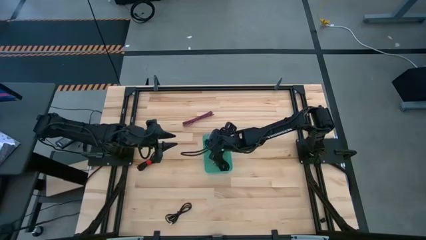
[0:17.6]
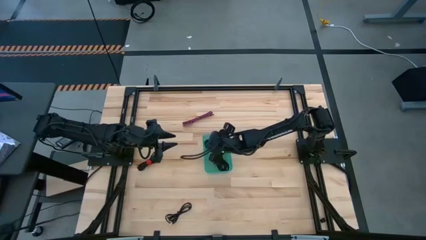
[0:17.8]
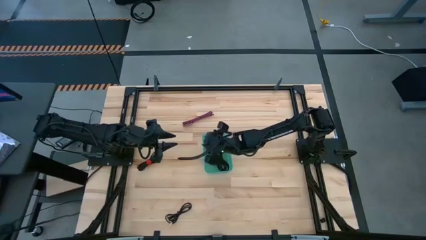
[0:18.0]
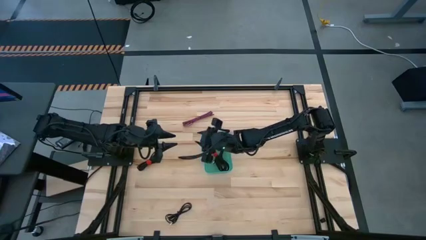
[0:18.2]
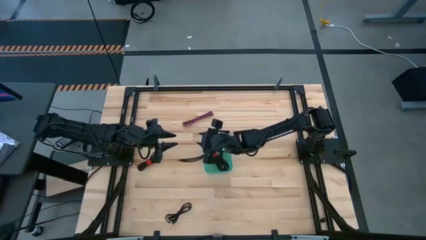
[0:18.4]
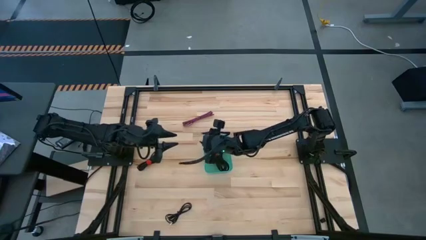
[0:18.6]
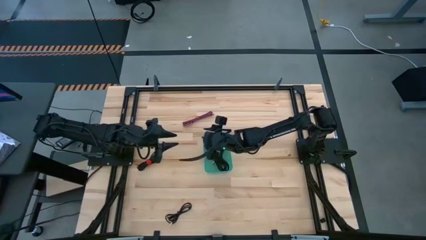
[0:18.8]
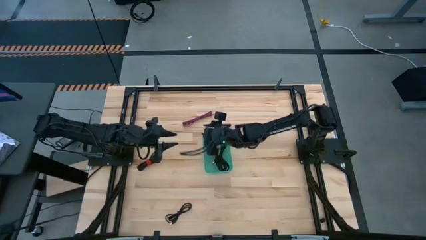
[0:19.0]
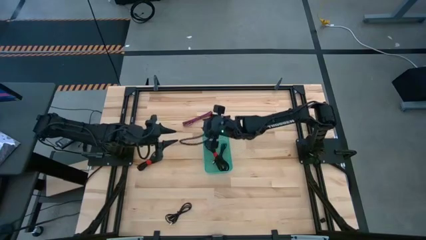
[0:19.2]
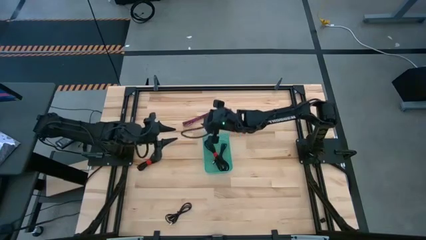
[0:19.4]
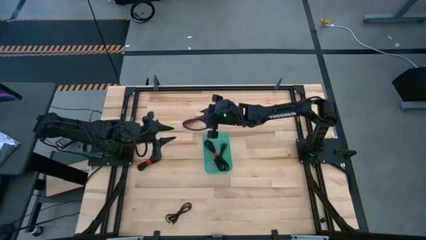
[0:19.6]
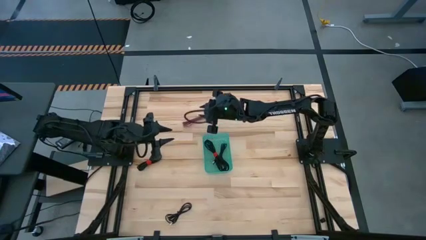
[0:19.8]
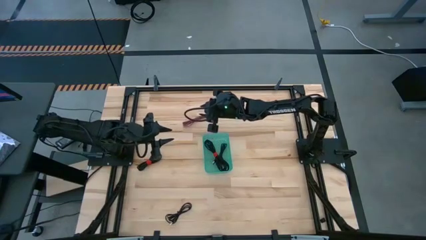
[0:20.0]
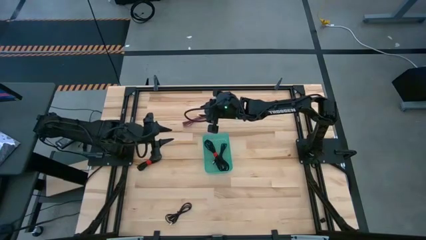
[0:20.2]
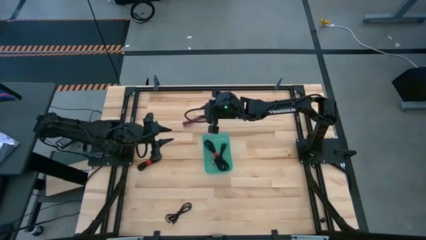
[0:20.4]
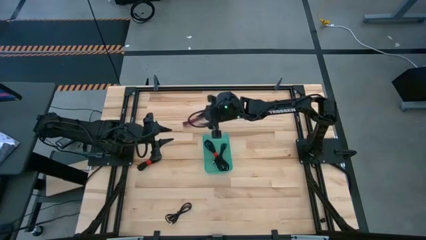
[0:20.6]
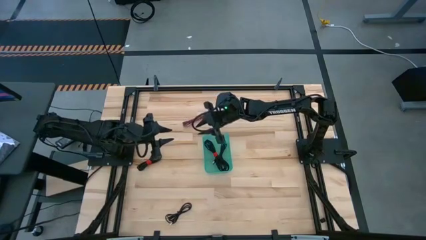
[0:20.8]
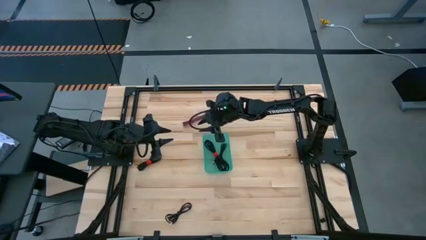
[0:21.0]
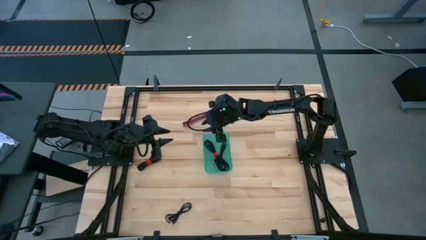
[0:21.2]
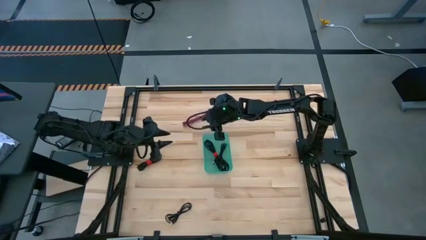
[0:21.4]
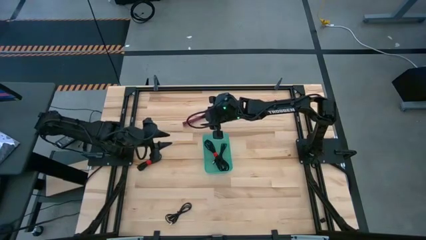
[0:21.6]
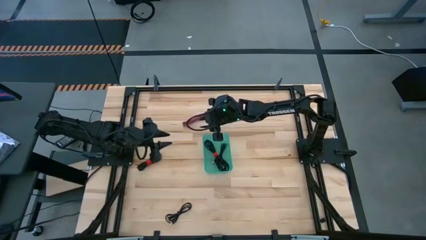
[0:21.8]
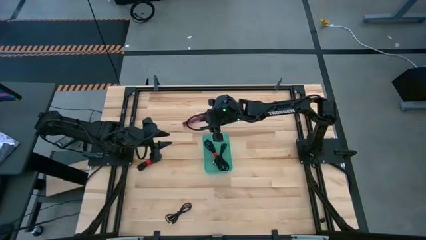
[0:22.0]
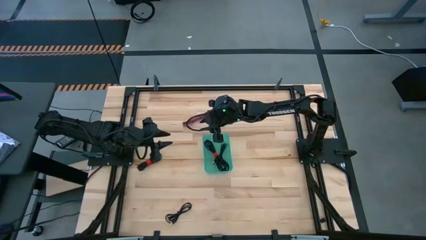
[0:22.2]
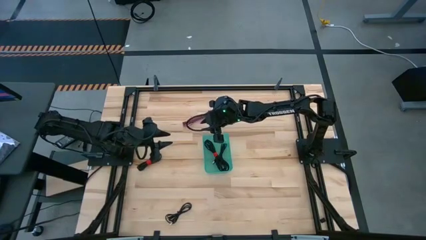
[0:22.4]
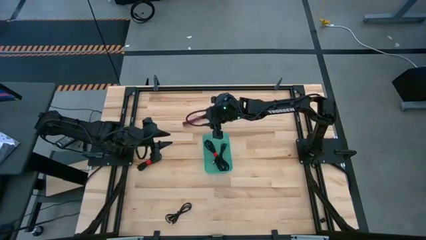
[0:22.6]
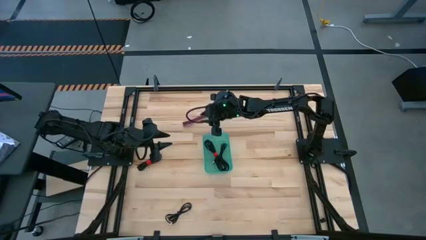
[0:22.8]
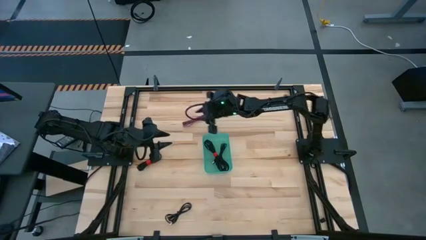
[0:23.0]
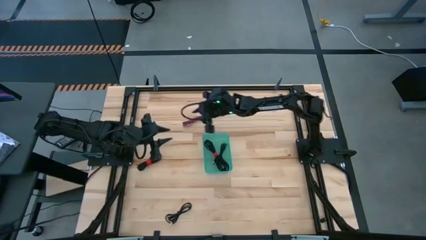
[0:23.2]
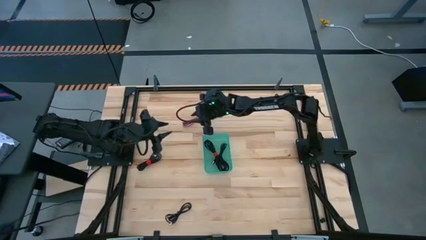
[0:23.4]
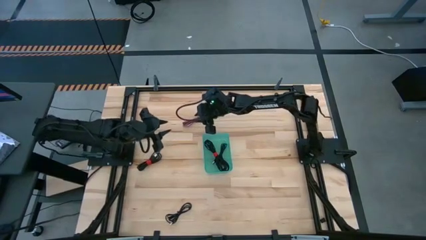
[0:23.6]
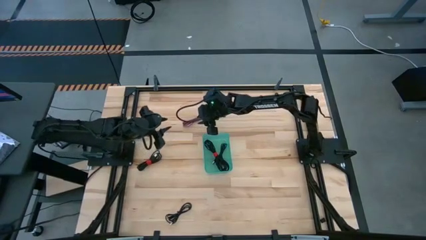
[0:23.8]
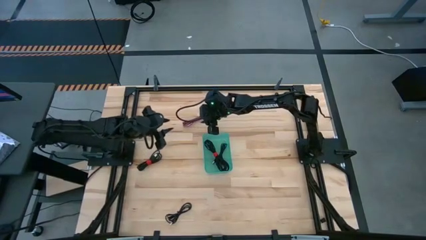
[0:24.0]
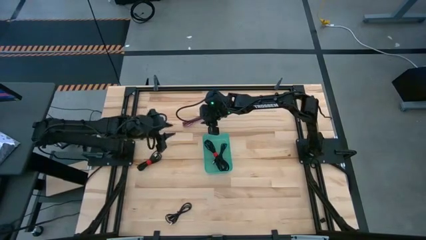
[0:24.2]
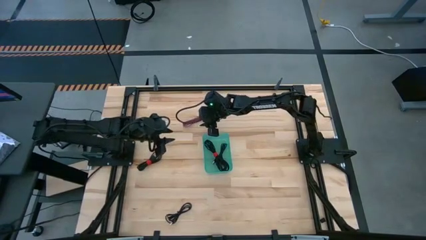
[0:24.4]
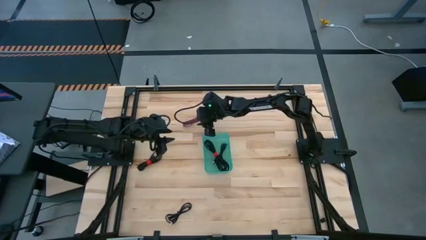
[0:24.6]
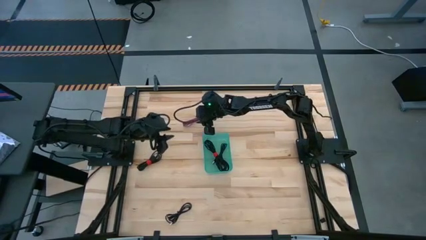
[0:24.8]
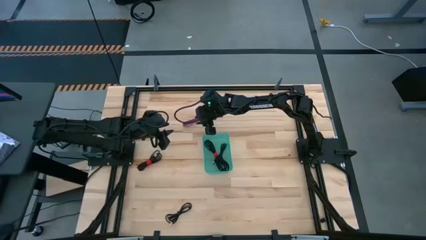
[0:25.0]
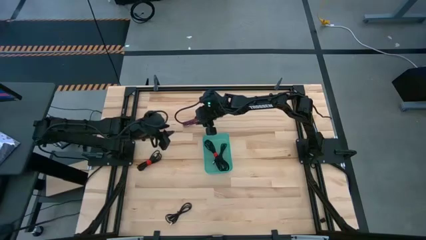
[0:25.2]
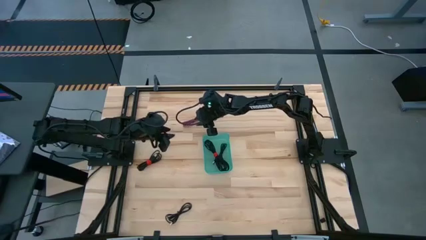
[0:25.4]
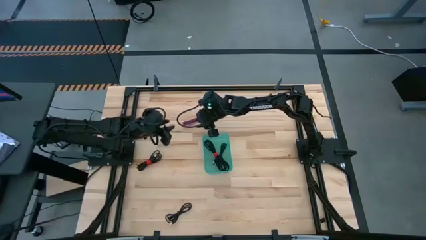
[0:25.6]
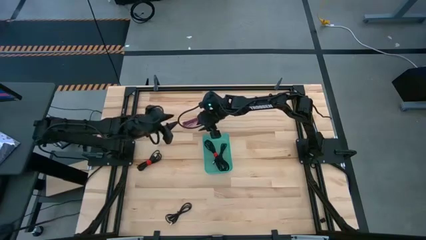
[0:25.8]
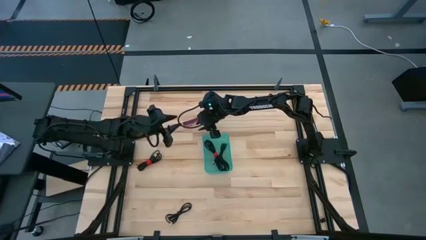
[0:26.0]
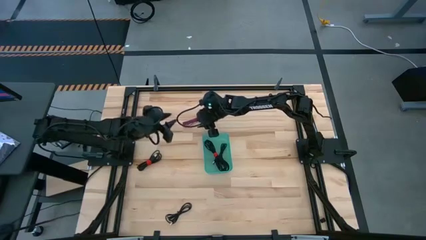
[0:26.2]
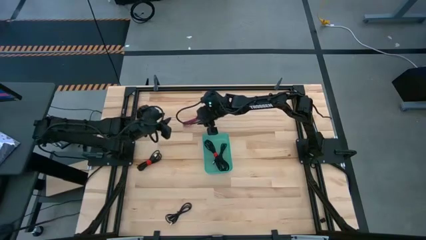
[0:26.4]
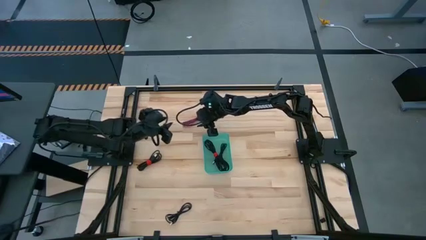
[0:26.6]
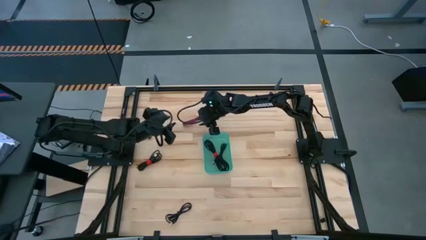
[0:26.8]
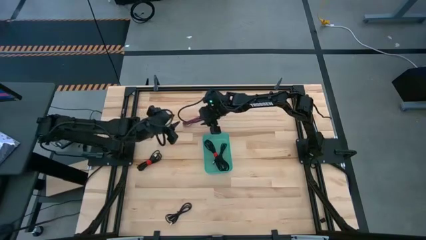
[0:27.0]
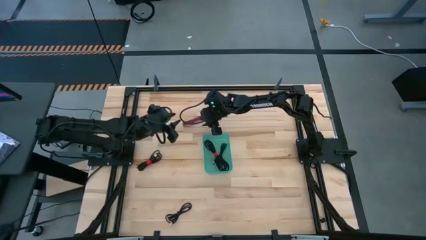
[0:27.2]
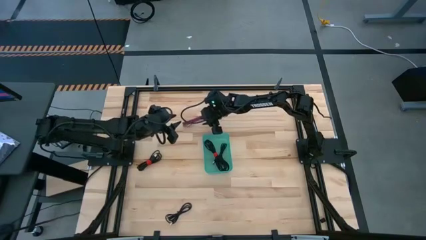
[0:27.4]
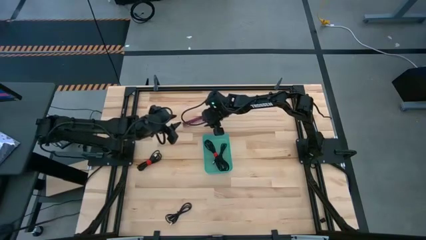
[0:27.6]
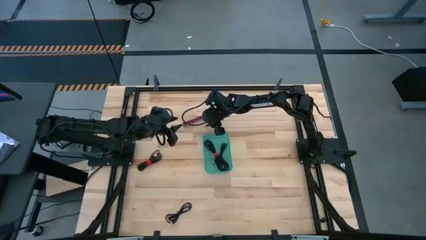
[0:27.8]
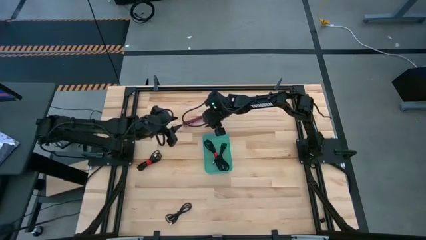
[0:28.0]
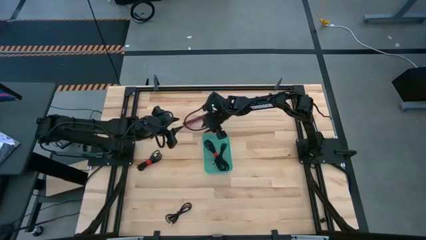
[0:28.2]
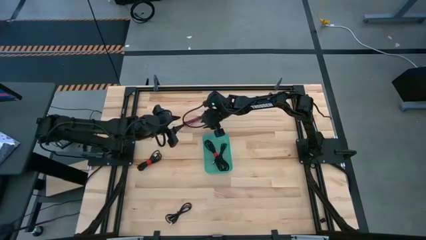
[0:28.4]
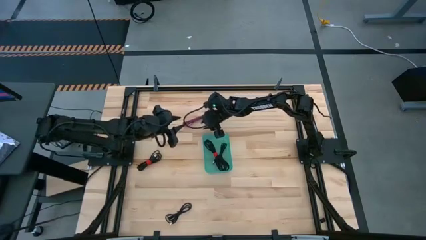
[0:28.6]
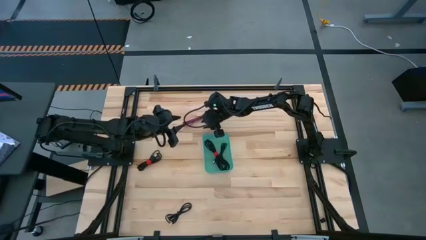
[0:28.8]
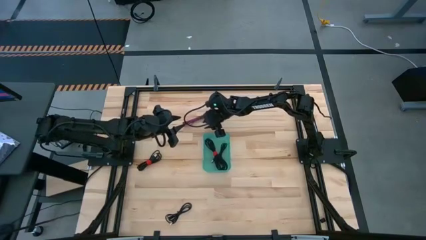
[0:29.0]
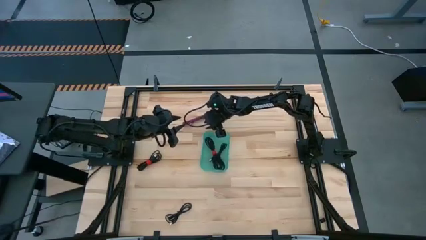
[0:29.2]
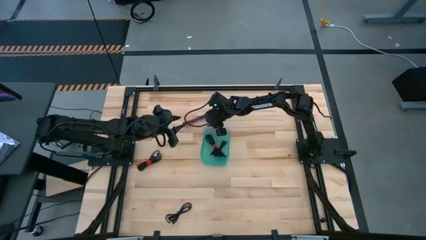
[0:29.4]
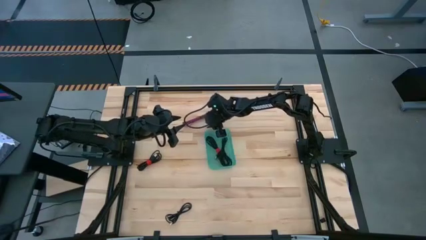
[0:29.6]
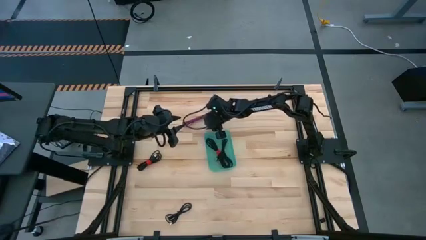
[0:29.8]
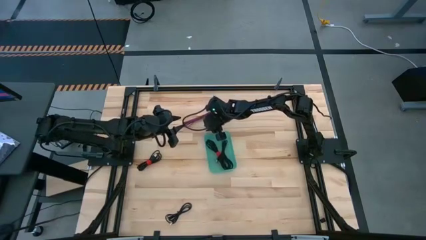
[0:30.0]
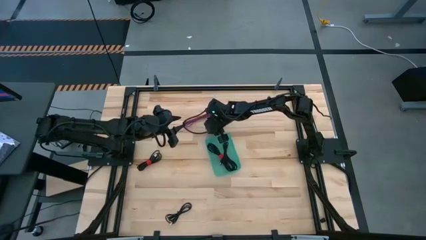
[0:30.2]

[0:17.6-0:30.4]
Task: Pick and place USB-C Cables
Adjust the green bin

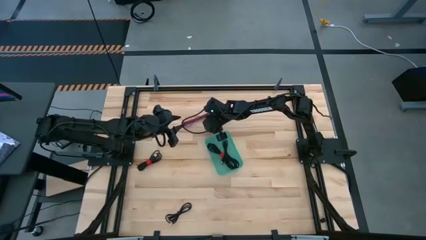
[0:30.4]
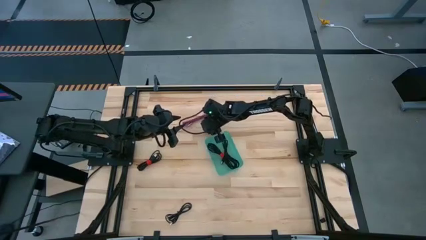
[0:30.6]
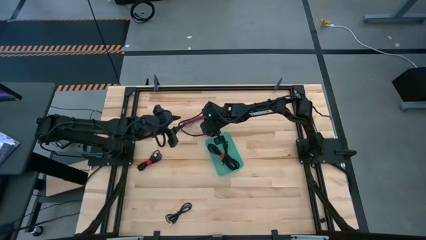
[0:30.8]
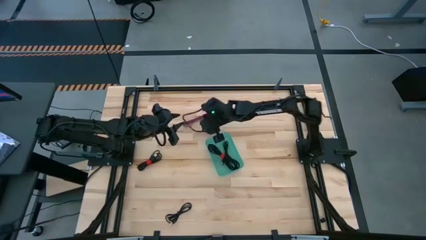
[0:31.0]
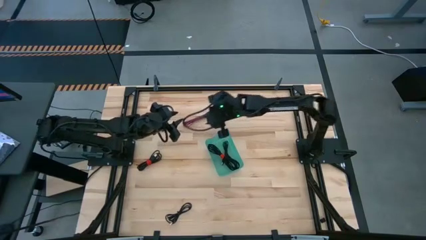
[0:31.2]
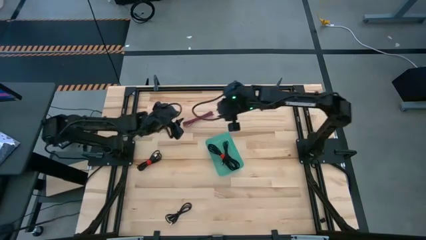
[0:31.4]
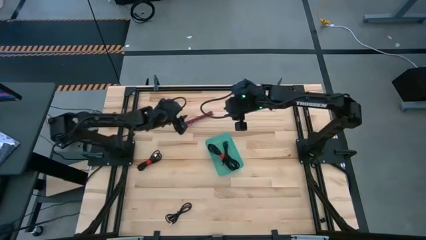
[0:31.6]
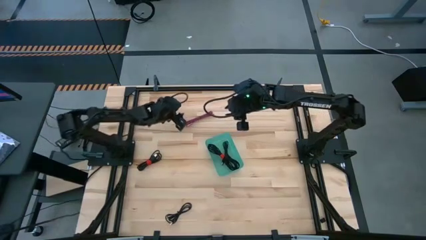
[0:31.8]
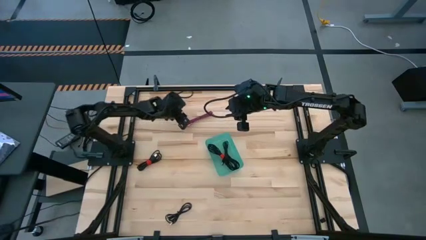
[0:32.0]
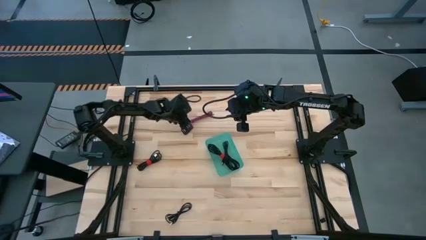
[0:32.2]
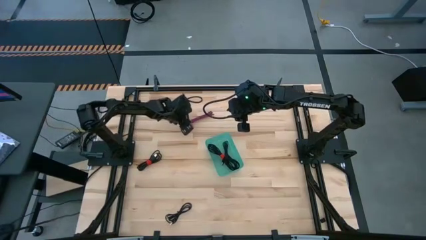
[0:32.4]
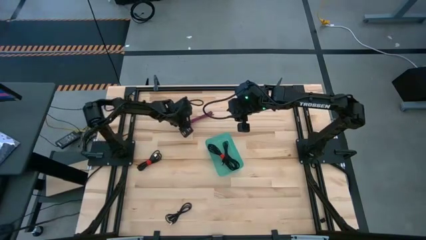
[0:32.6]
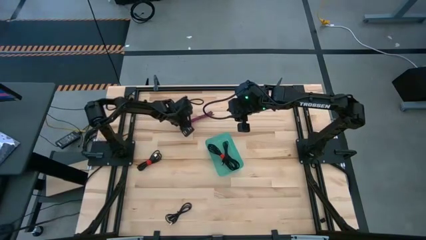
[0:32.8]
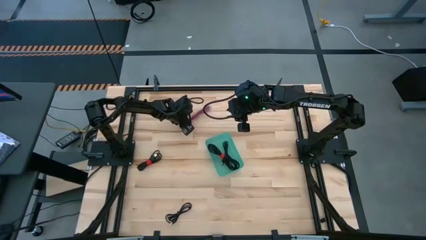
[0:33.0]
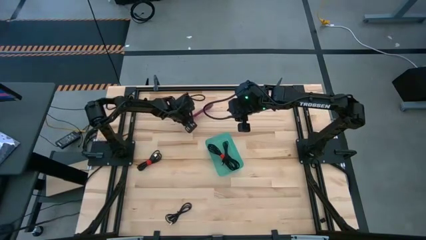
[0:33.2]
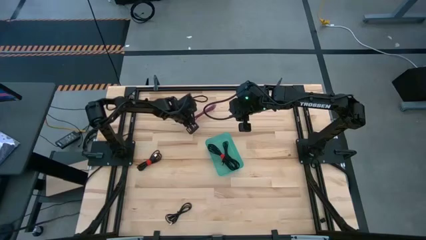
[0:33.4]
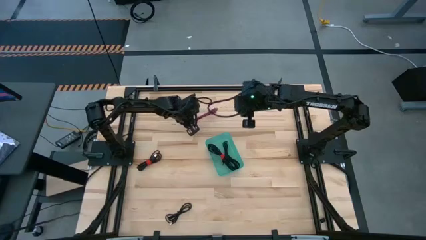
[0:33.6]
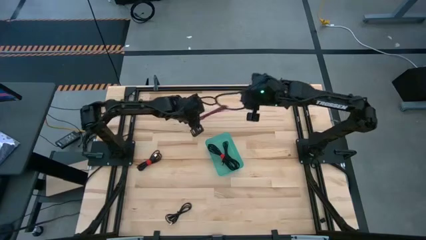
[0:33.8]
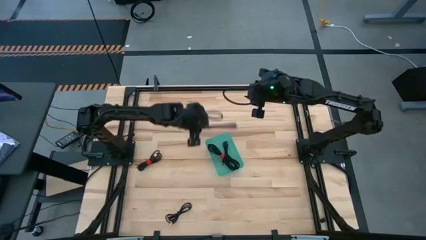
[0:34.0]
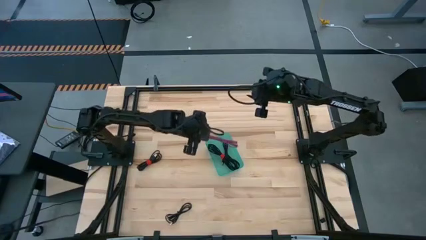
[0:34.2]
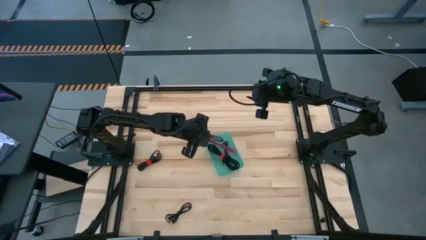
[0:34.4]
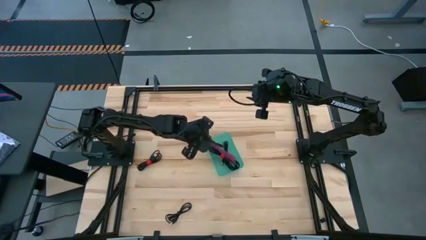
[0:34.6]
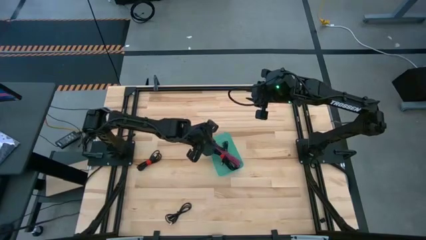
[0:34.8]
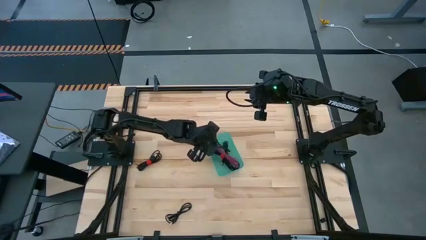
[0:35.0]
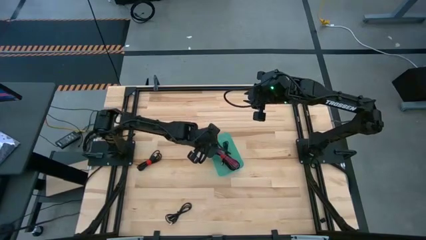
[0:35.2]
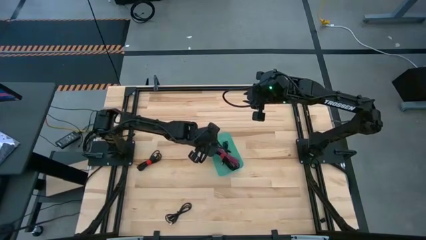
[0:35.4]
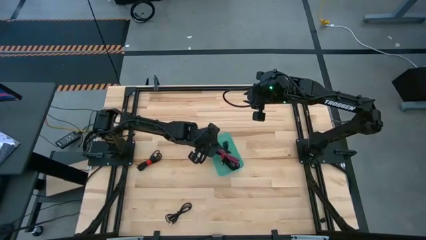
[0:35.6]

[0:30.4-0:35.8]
Put the pink charger cable into the green bin
